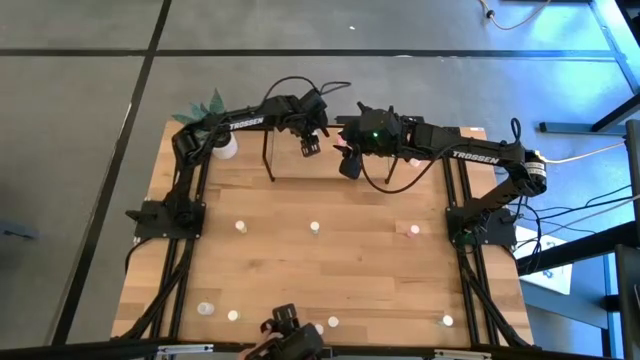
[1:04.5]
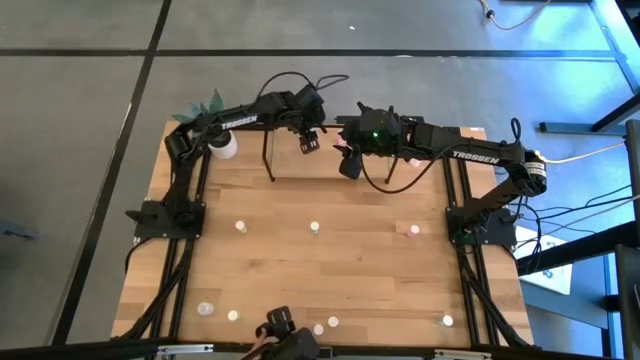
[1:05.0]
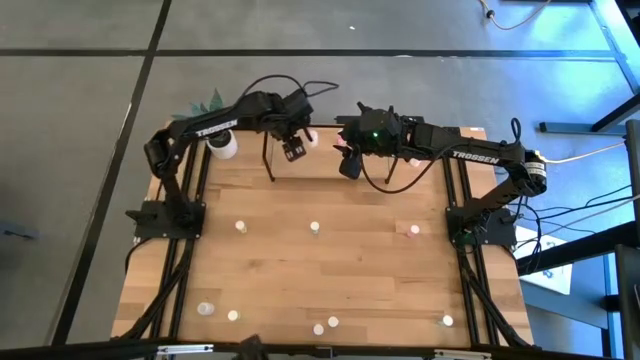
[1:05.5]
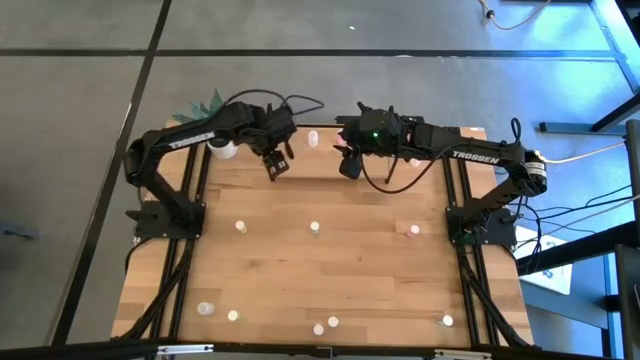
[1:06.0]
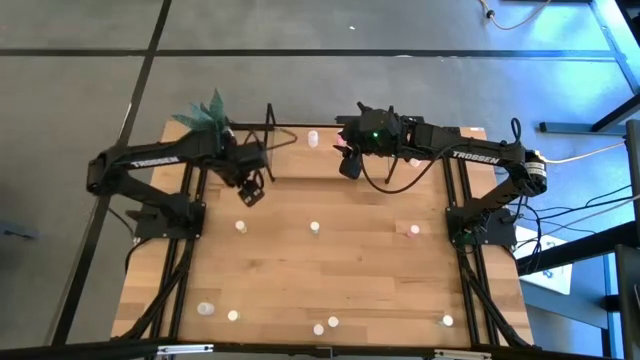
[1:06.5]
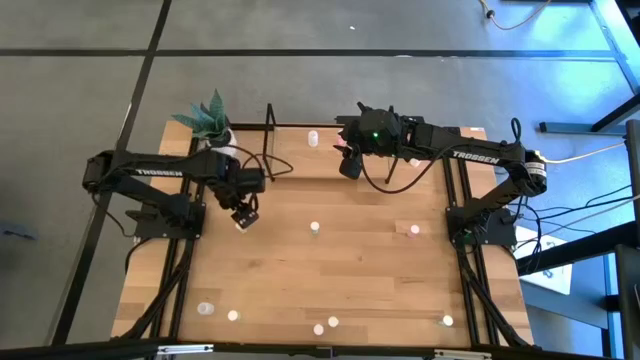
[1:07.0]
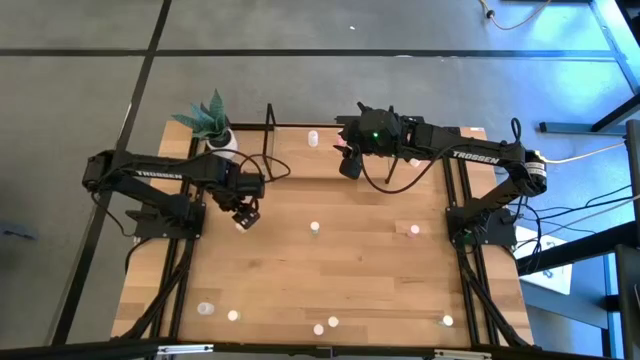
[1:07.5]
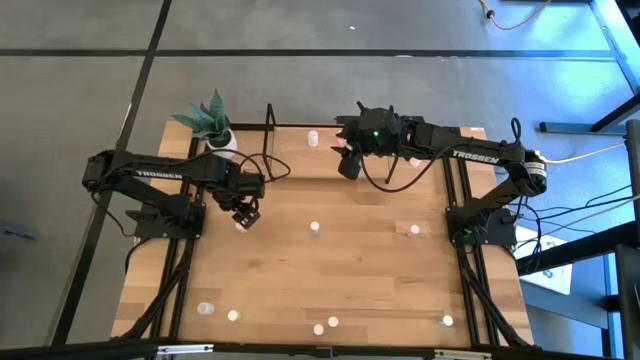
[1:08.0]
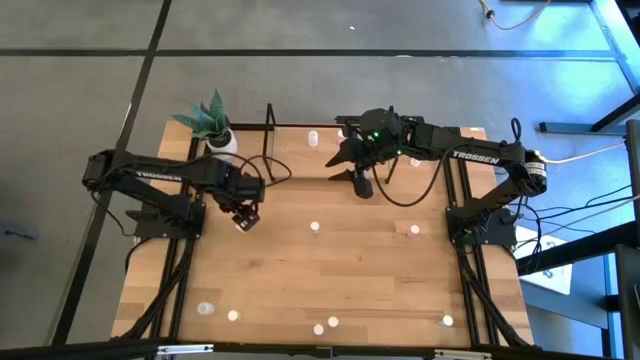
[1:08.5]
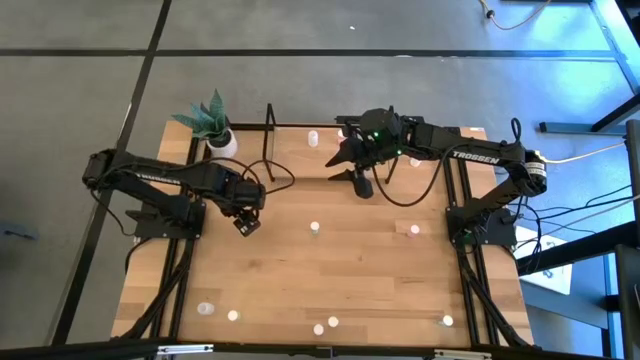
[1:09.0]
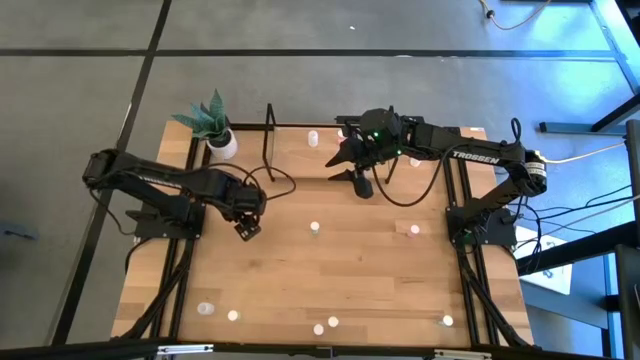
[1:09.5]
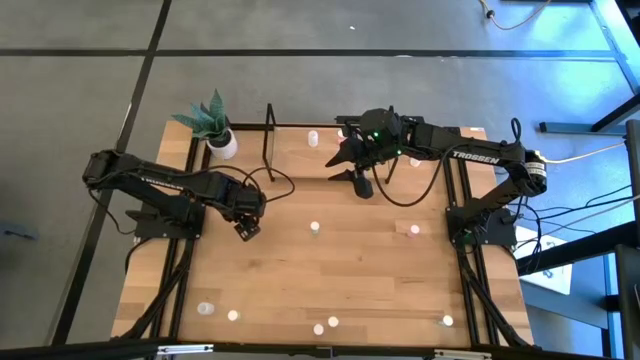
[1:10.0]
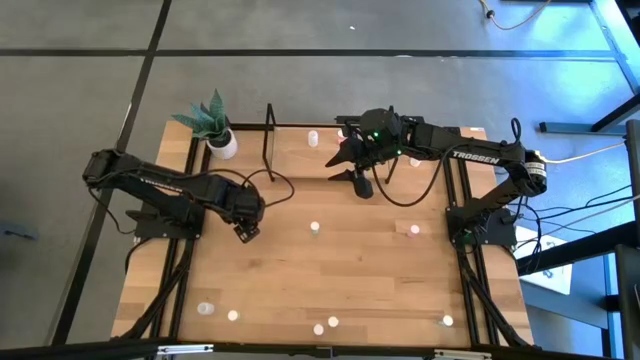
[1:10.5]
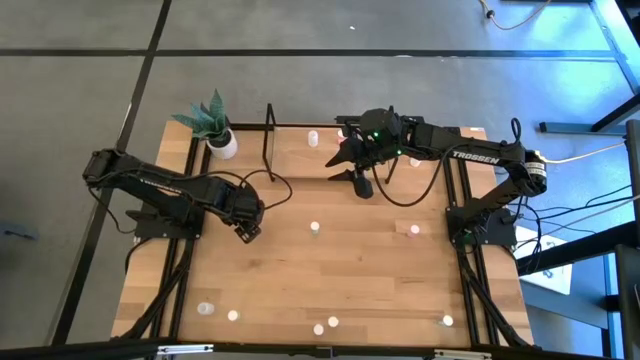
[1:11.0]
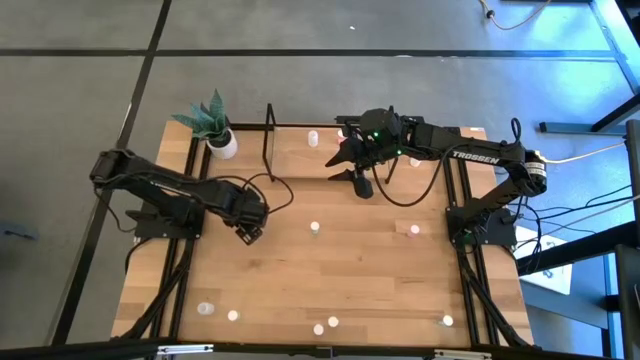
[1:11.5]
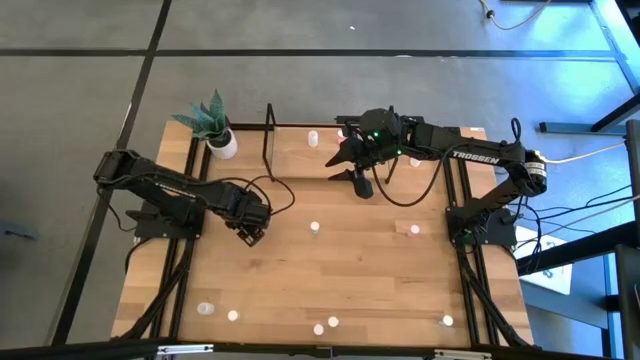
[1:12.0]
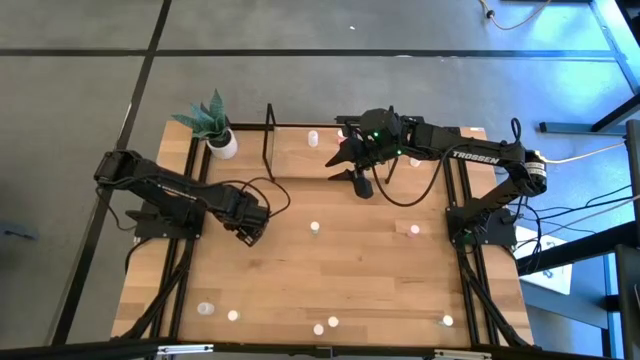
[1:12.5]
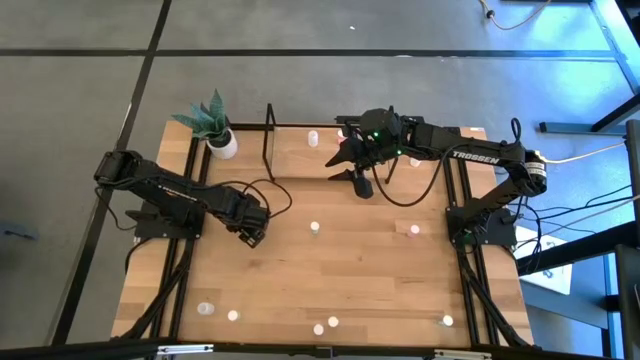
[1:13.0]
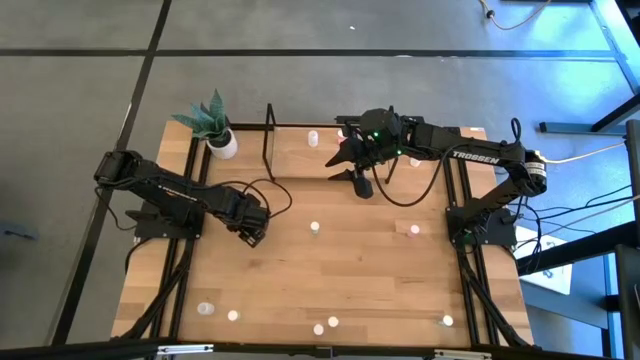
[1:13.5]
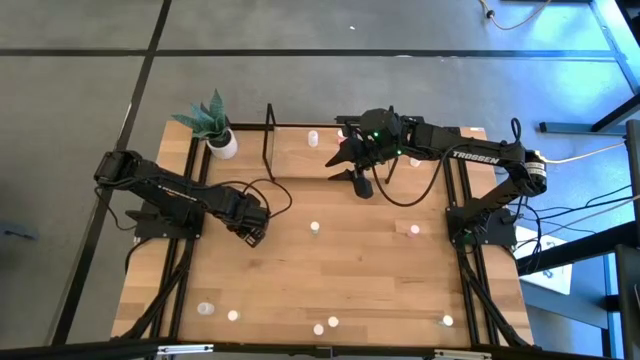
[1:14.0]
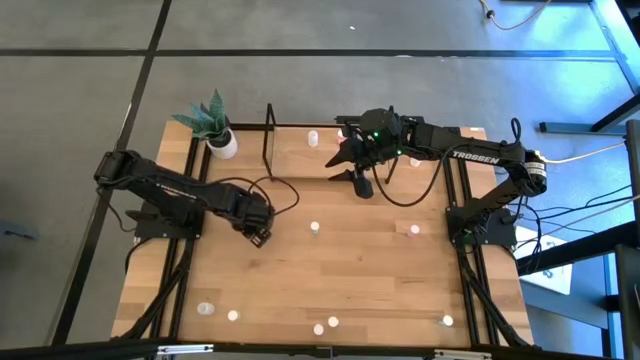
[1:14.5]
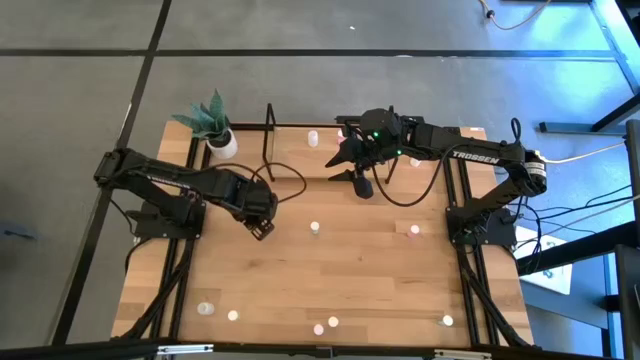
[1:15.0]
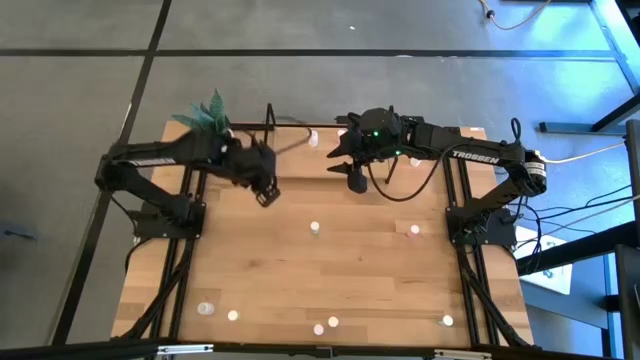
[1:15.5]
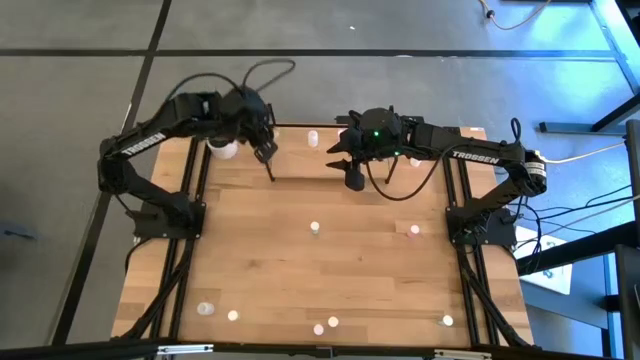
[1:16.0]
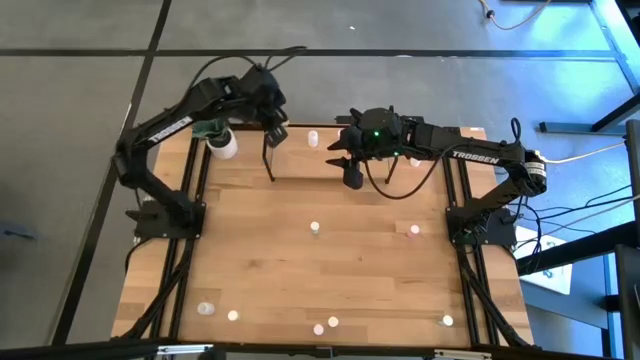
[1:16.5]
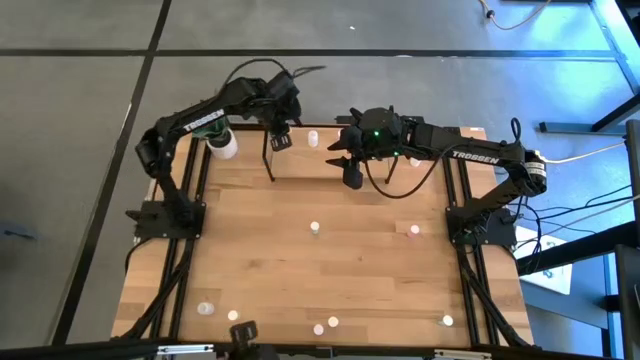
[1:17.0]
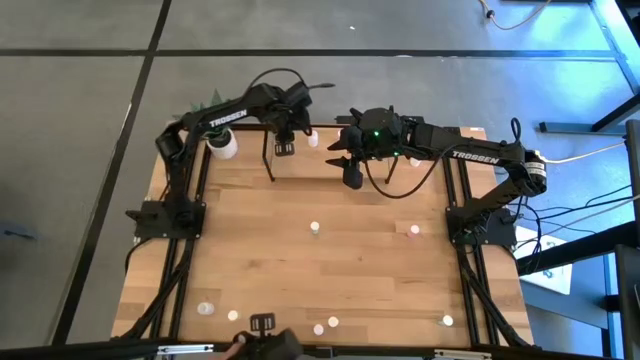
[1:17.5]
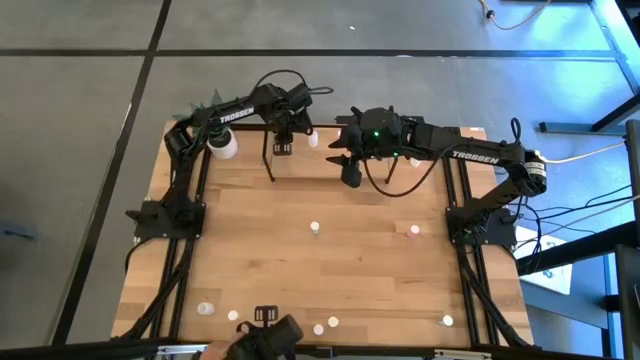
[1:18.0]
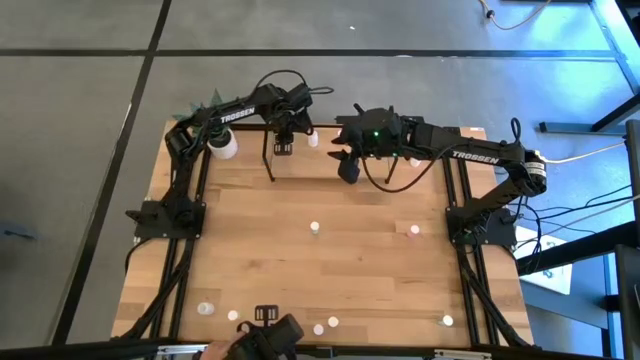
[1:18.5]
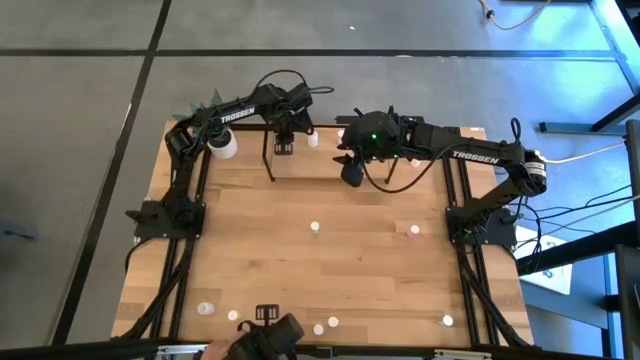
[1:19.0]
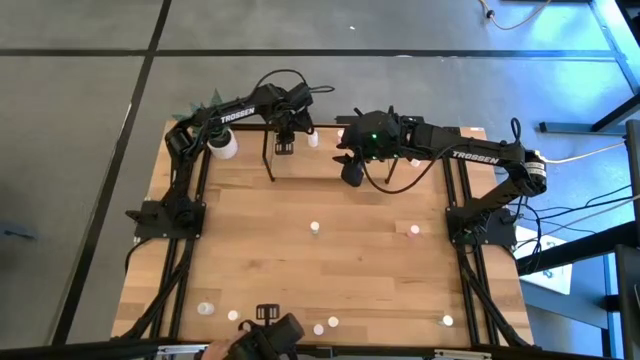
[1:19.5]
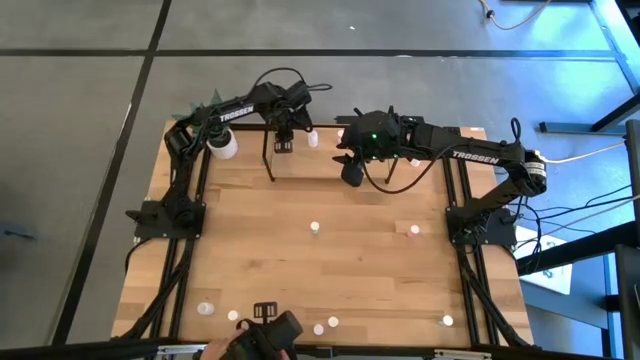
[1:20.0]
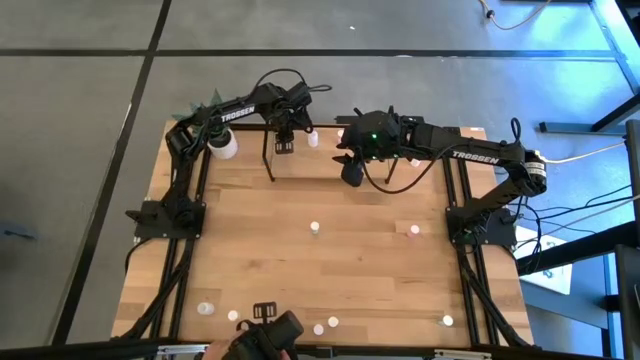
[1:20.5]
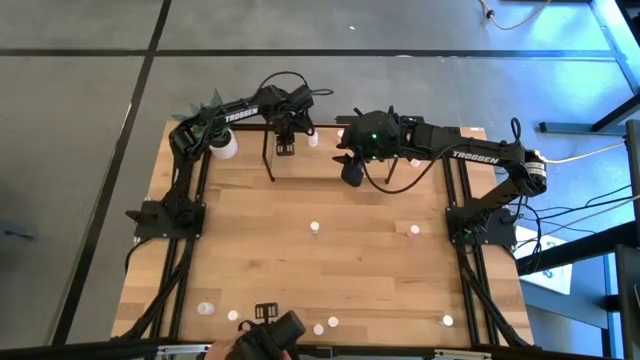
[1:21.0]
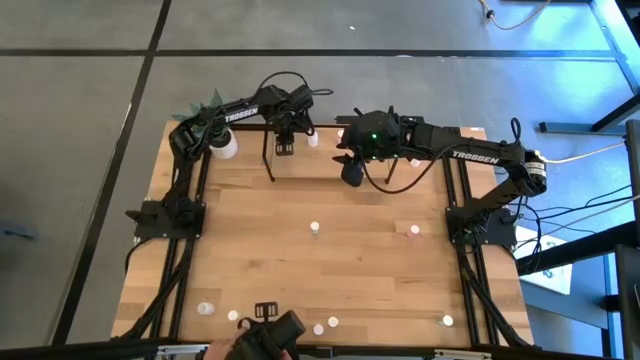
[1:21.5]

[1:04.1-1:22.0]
Task: Pick and place medicine bottles onto shelf by color
Put the top yellow pill bottle on the shelf

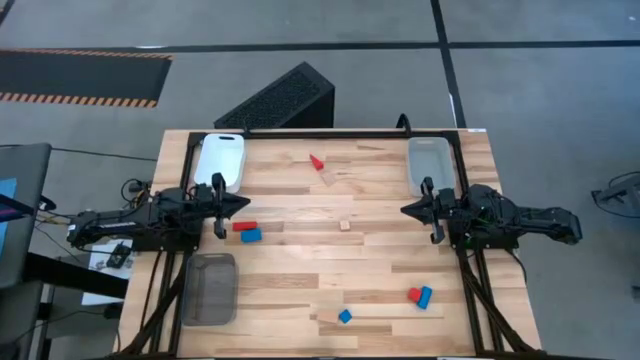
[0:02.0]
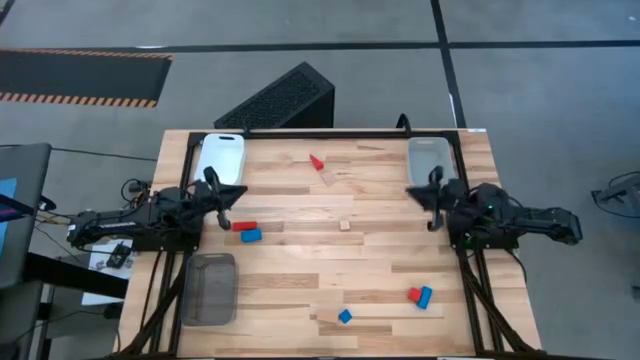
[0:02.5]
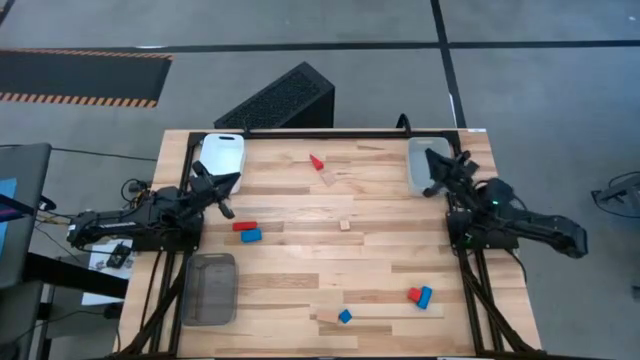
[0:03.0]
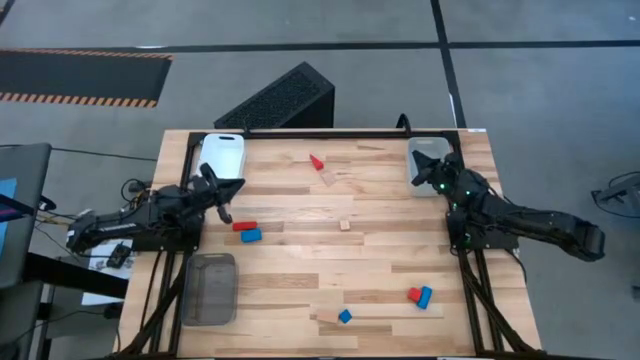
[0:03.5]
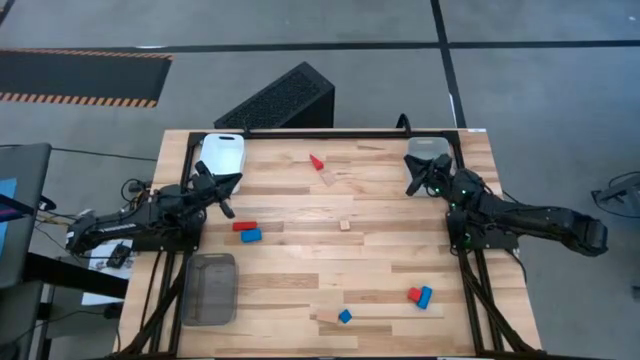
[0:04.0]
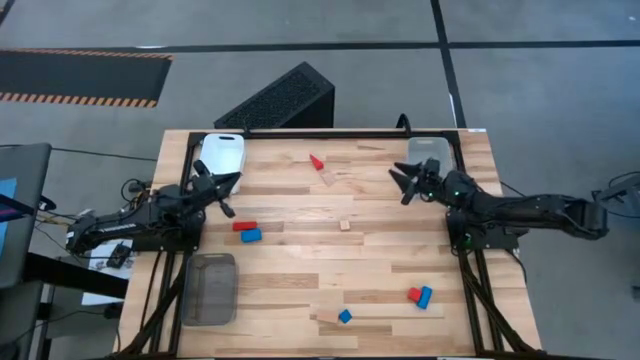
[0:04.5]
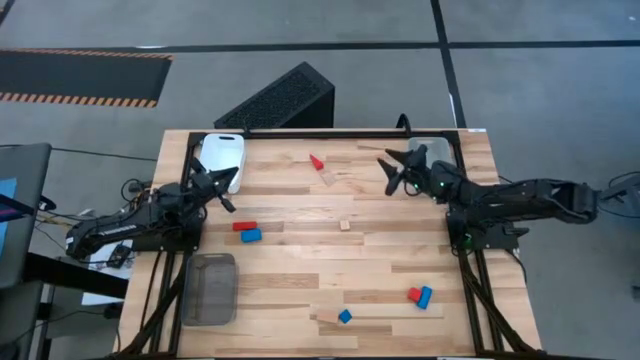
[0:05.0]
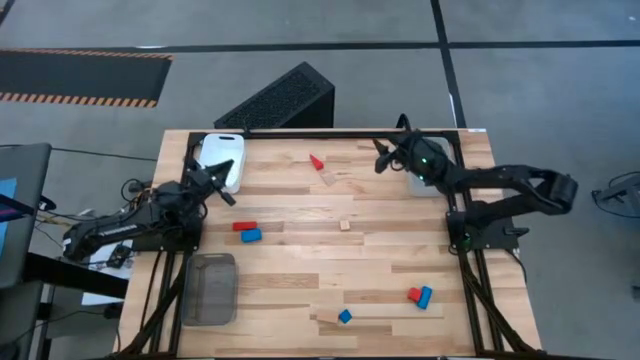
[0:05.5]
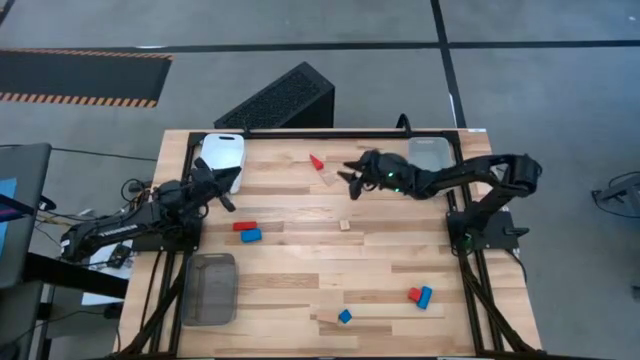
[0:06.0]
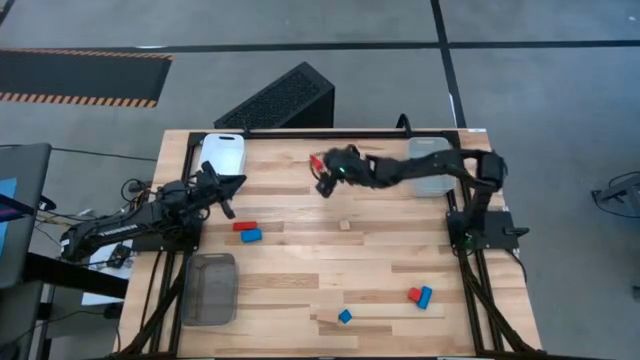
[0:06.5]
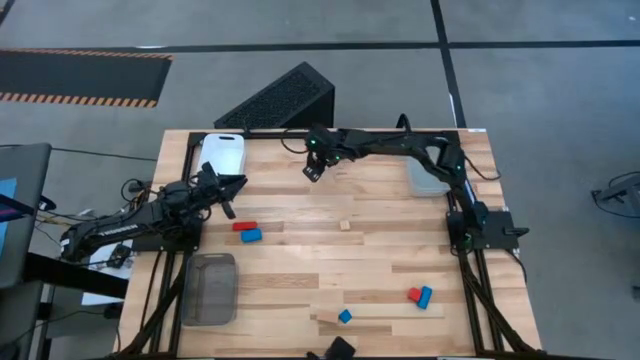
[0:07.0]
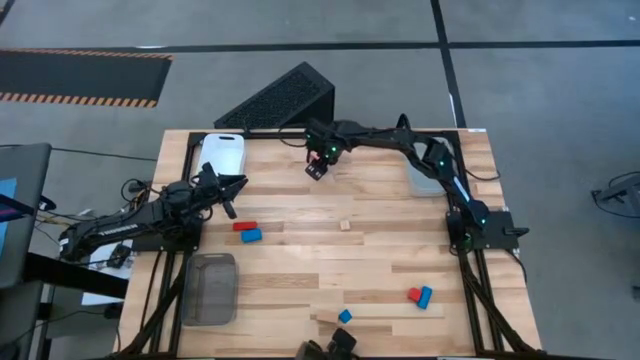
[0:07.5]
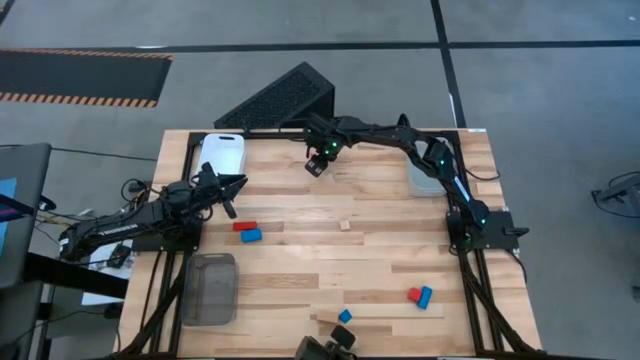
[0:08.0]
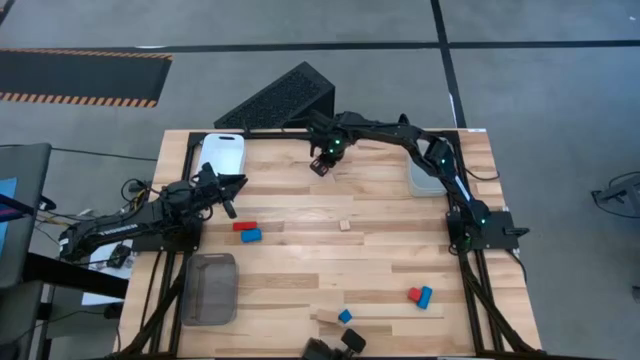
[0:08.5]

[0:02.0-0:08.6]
Task: Sort & place blocks by color
Put the top red block into the white bin
